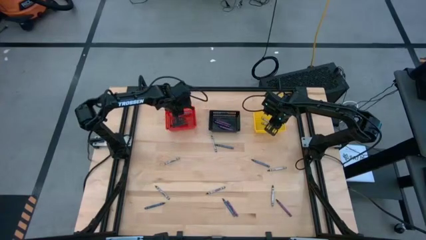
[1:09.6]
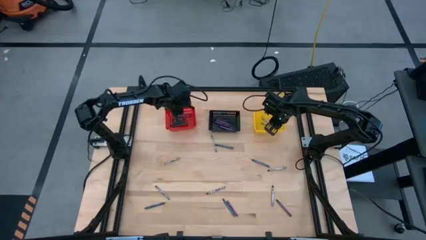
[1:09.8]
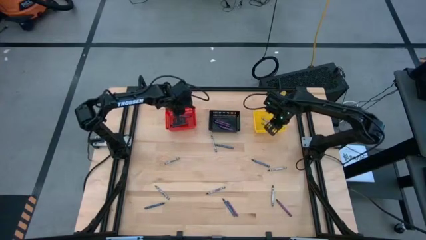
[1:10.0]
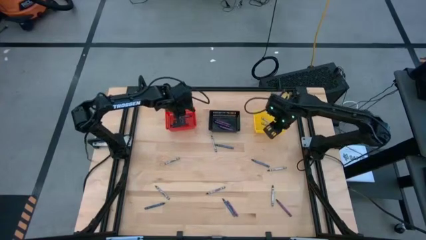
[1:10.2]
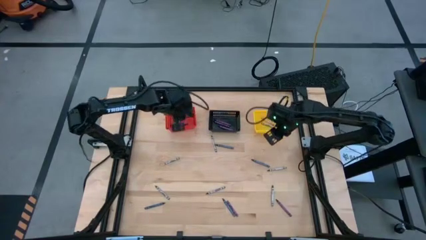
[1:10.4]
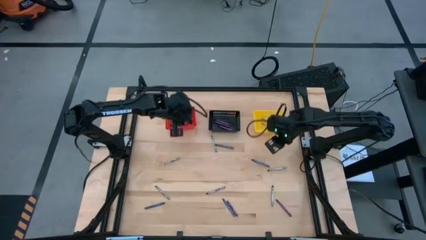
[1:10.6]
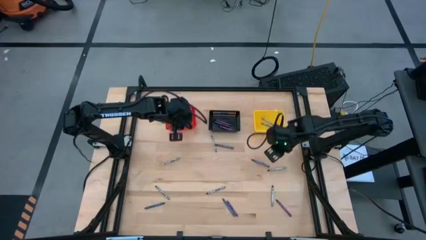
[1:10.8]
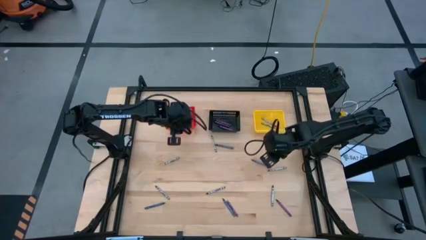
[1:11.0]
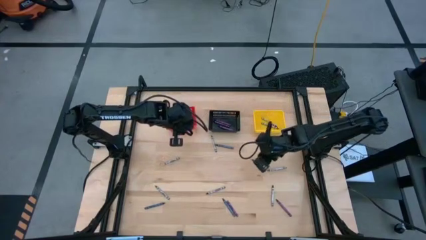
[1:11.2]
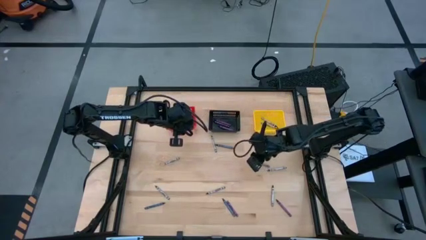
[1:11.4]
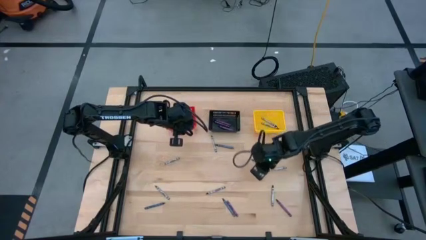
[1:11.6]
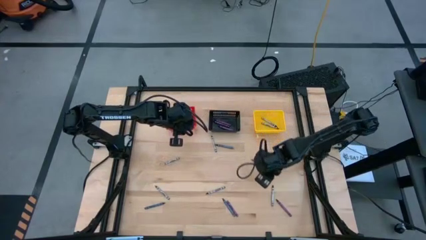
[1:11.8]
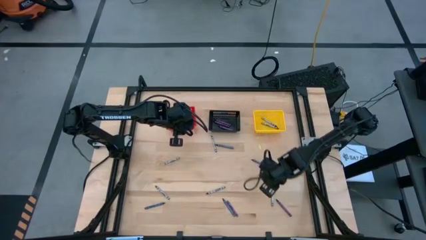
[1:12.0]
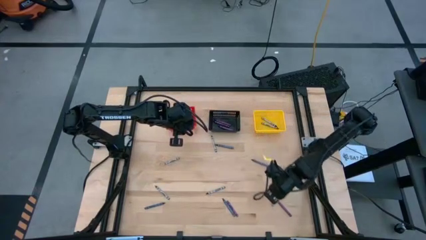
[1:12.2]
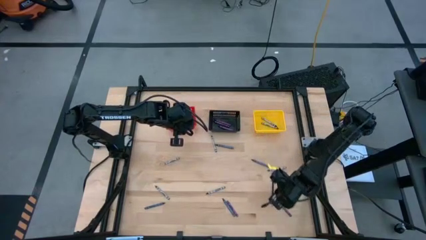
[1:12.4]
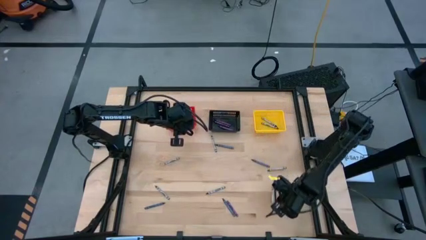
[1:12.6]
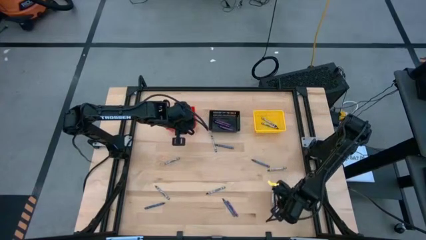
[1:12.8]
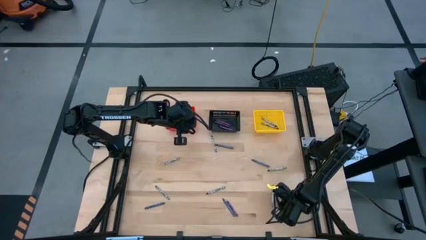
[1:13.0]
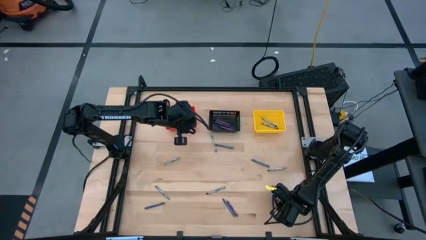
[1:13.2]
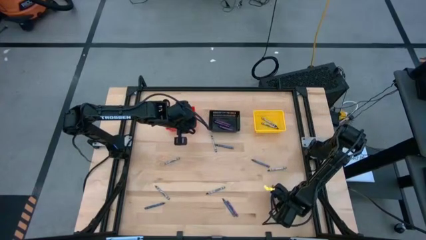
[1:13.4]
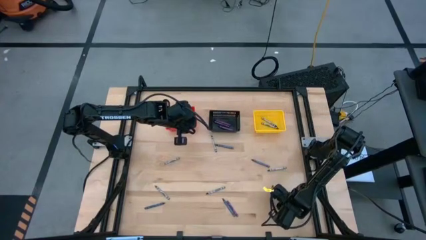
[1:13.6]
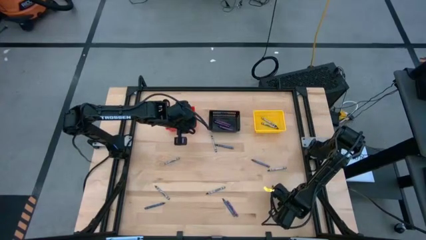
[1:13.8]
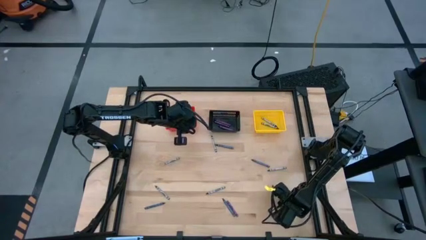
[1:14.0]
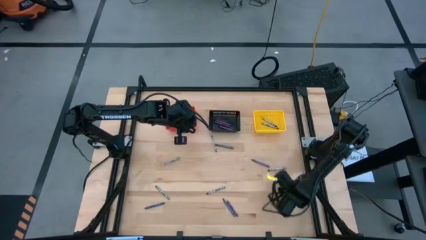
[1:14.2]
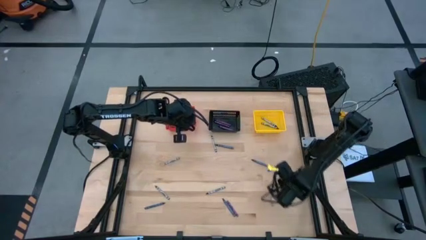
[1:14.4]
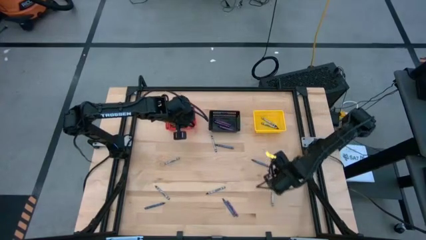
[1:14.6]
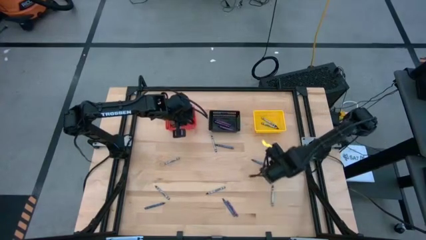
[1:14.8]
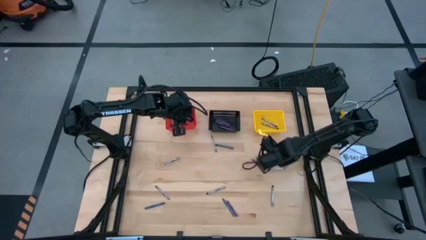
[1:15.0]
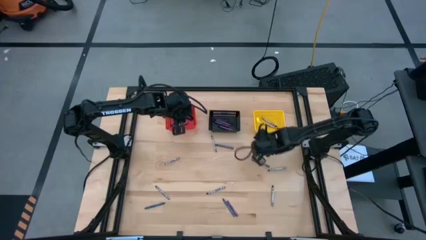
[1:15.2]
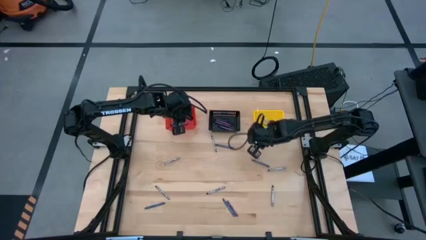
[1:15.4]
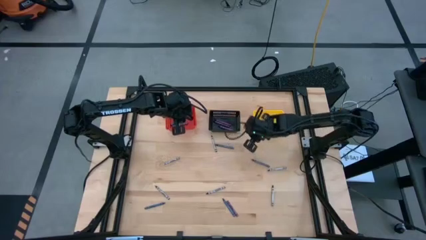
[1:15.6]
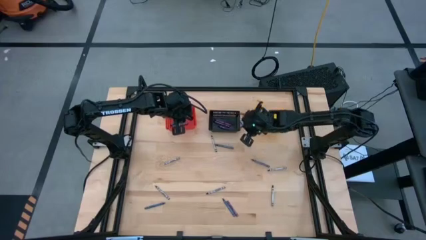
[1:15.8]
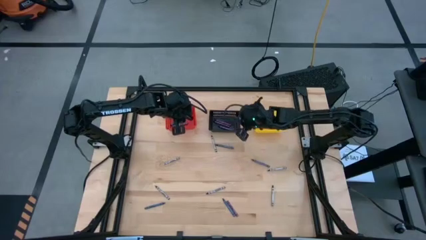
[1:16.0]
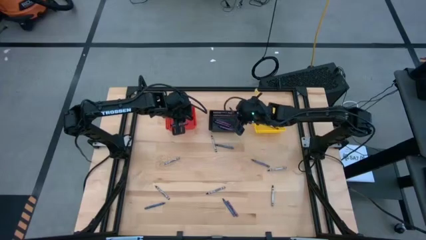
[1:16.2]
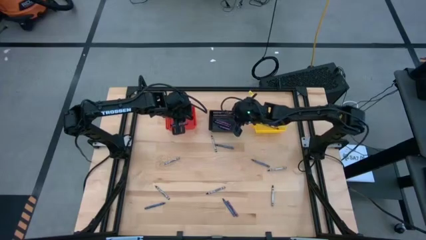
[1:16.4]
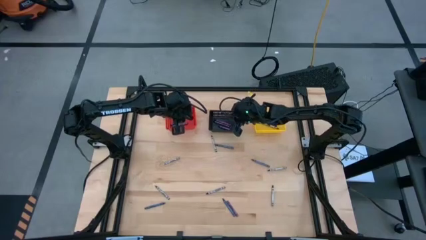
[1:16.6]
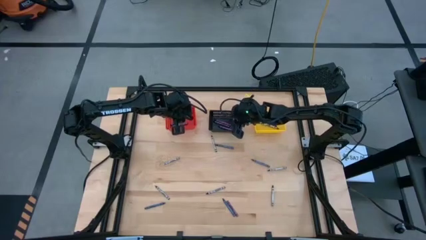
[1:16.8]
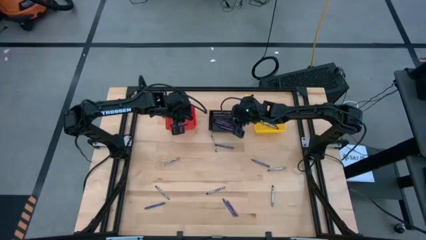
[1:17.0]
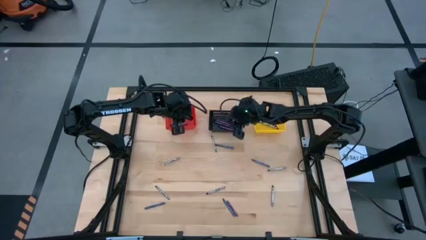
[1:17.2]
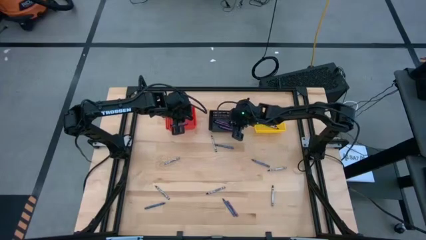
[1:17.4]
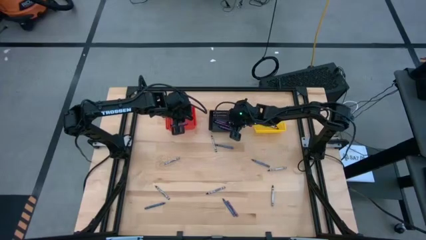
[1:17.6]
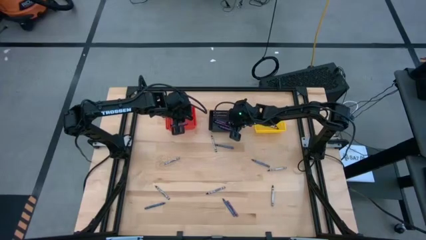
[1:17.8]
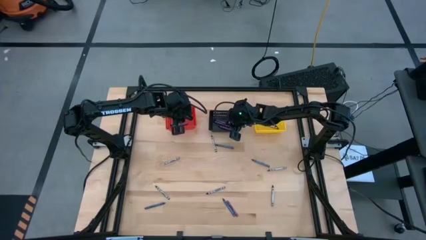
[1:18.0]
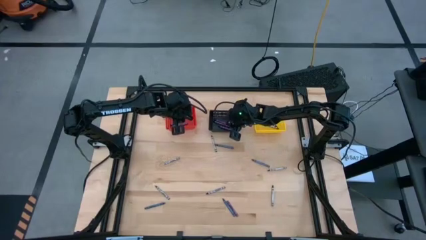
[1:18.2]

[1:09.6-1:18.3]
Task: Sort crayons
Put the violet crayon into the black bin

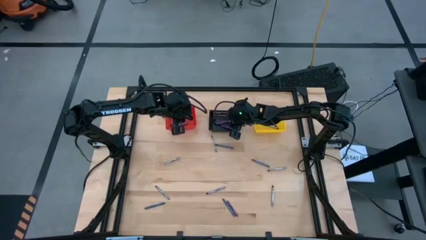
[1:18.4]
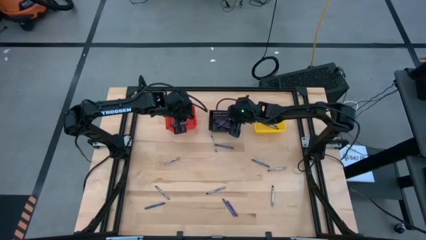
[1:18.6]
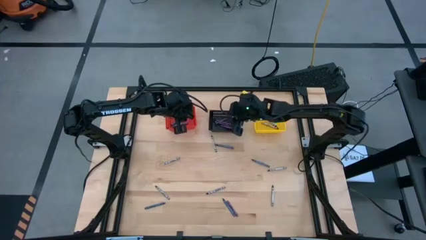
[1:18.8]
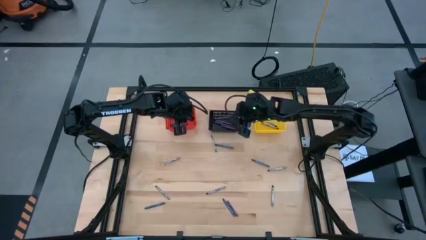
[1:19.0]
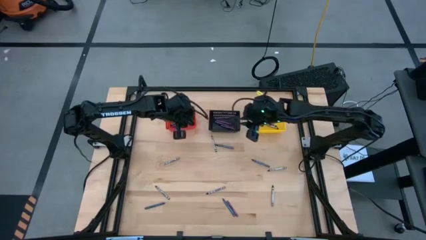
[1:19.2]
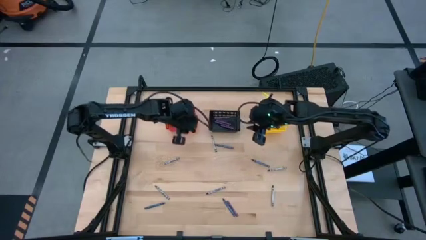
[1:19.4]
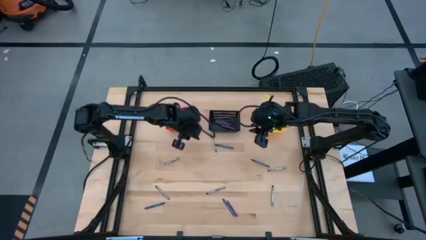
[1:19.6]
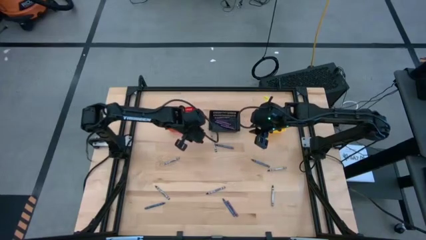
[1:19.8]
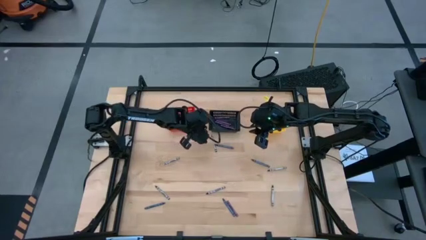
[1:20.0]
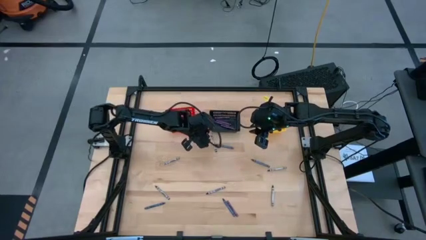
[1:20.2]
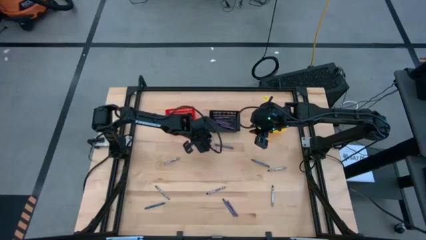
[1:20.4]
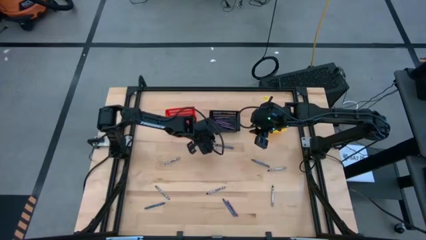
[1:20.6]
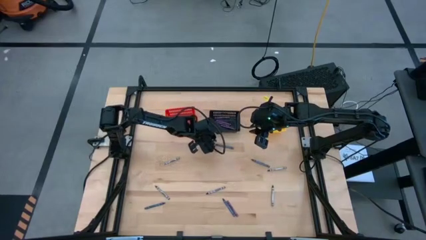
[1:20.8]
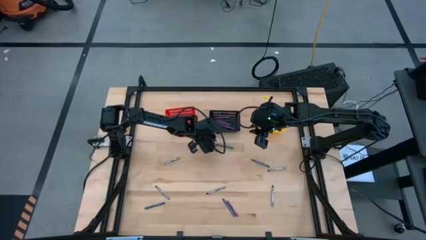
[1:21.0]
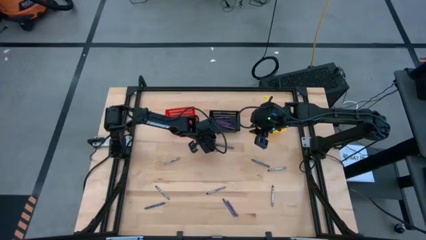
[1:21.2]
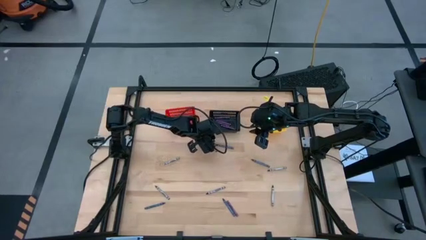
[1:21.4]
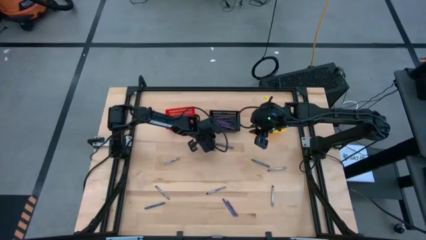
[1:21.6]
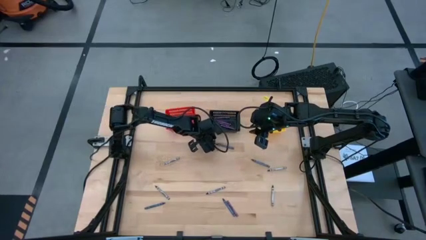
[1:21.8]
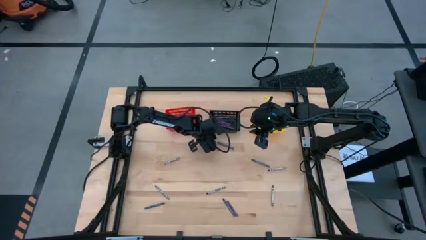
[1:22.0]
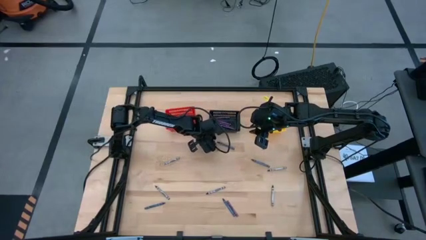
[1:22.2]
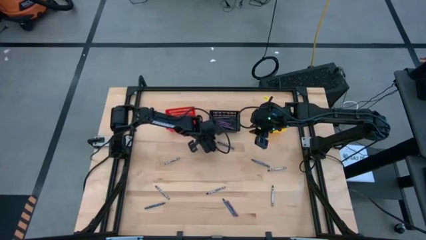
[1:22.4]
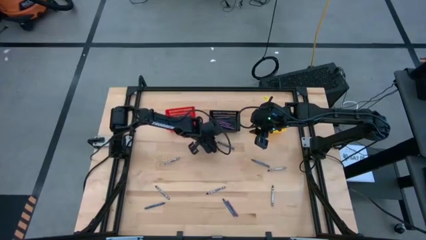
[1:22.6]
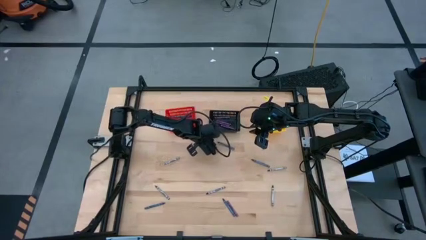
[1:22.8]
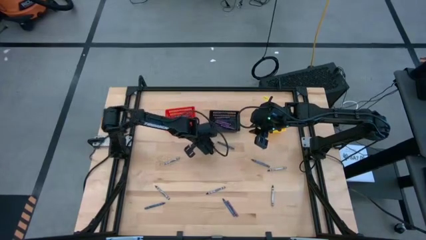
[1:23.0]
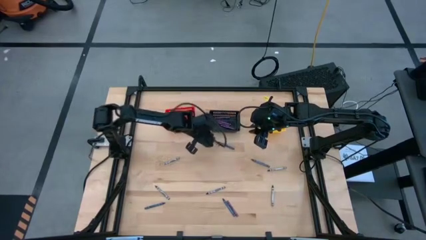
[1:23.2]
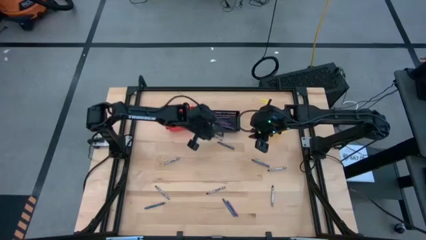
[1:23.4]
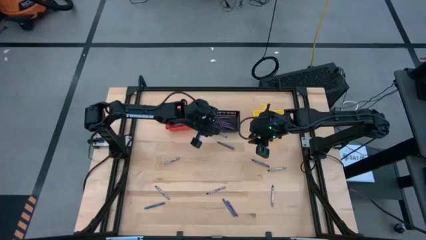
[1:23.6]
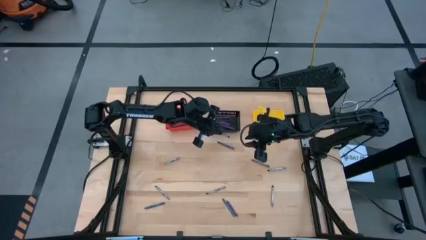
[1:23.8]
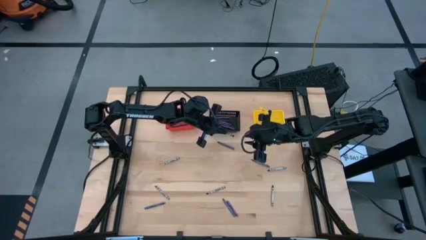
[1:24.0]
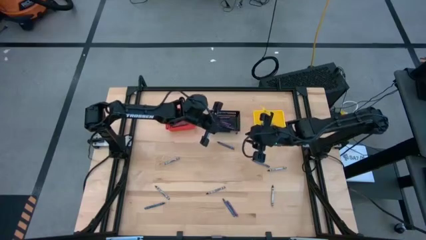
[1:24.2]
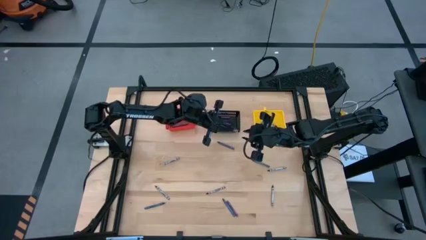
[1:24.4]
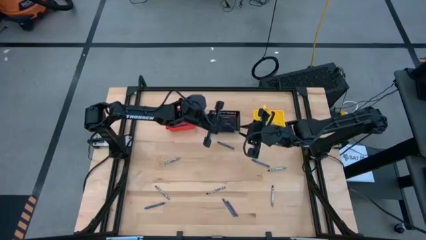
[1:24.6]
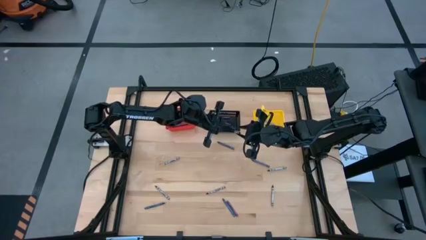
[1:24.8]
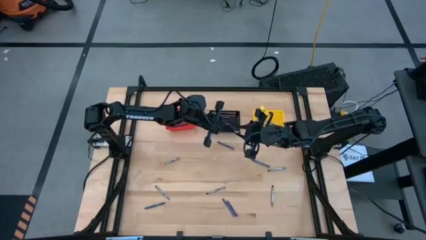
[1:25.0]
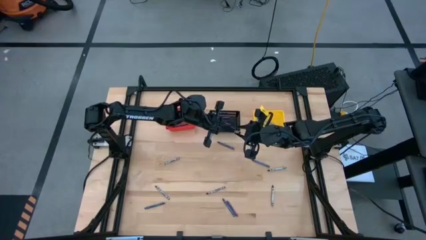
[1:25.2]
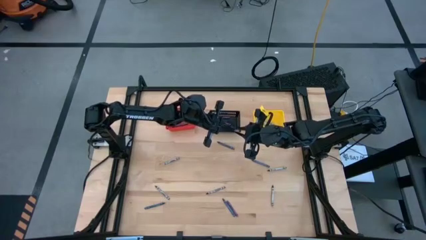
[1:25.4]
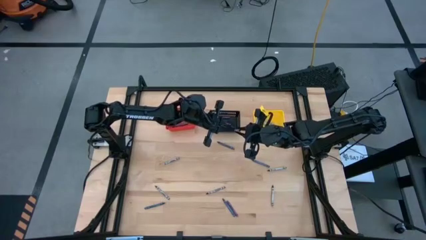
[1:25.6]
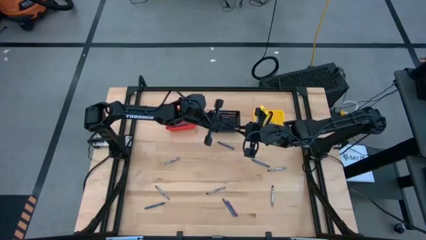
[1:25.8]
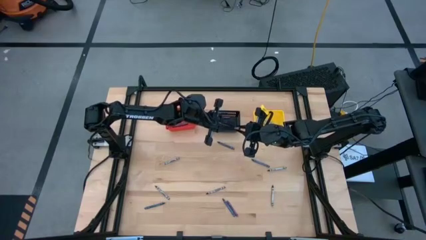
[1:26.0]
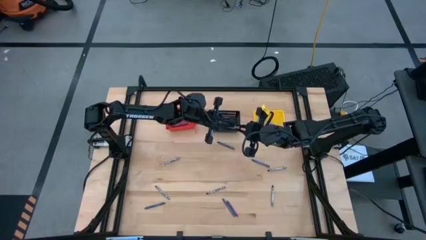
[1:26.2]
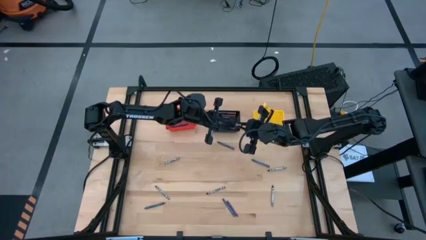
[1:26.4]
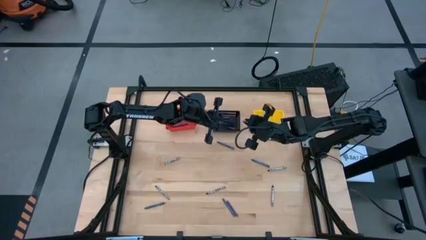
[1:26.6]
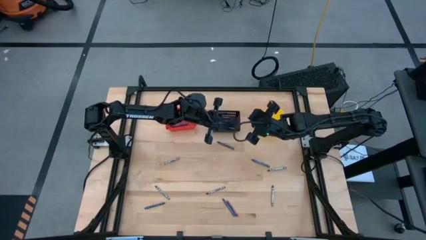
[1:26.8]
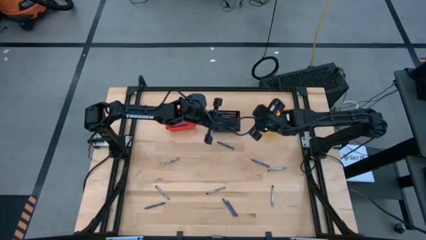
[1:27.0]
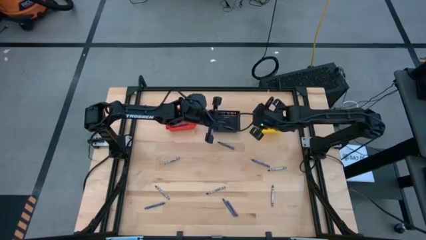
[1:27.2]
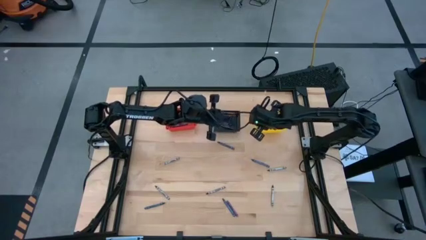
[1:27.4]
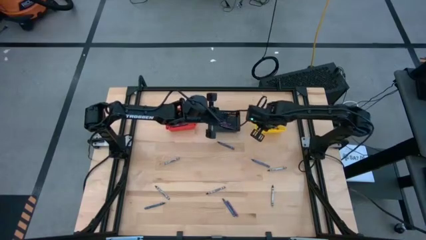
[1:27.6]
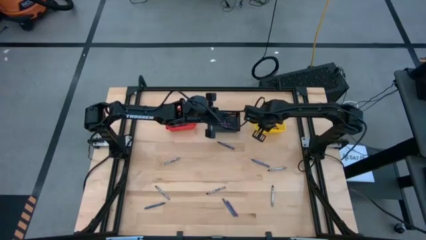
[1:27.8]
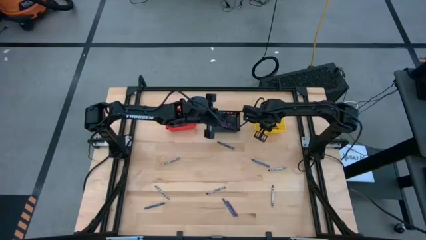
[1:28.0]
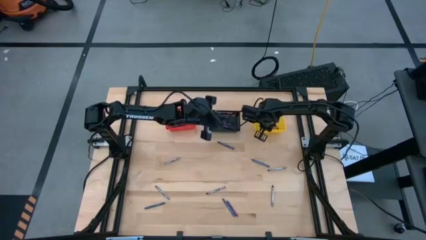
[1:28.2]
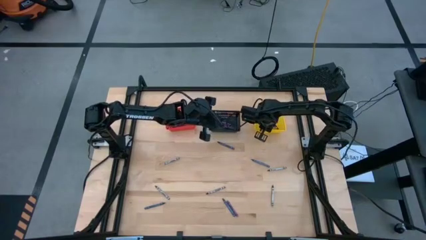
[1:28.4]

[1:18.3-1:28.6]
Put the black crayon into the yellow bin
